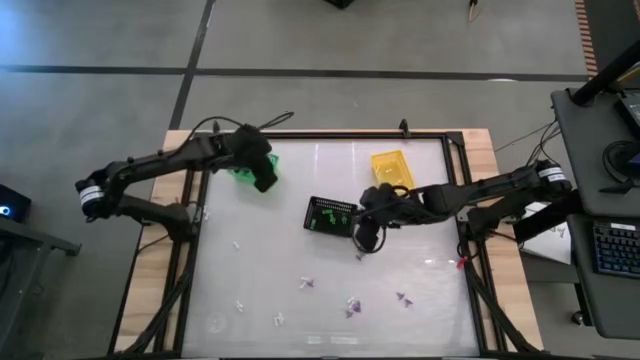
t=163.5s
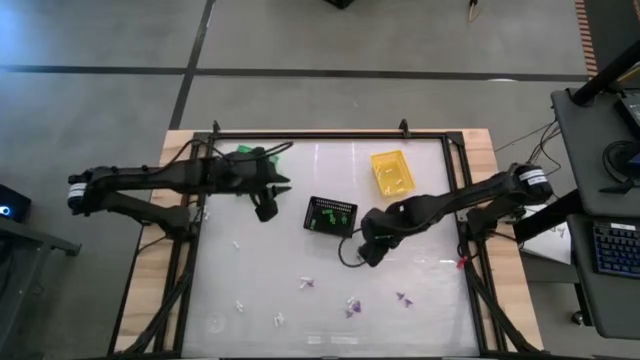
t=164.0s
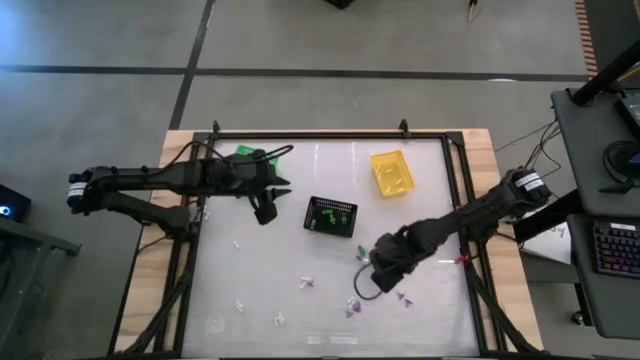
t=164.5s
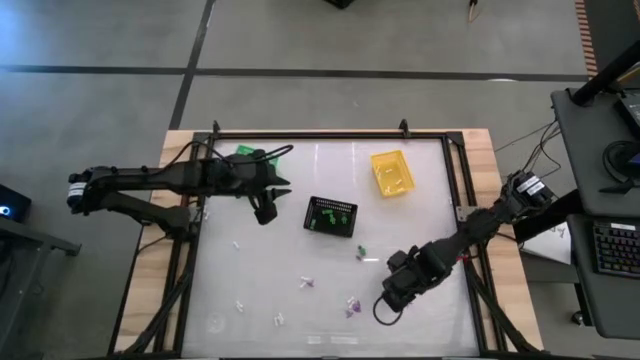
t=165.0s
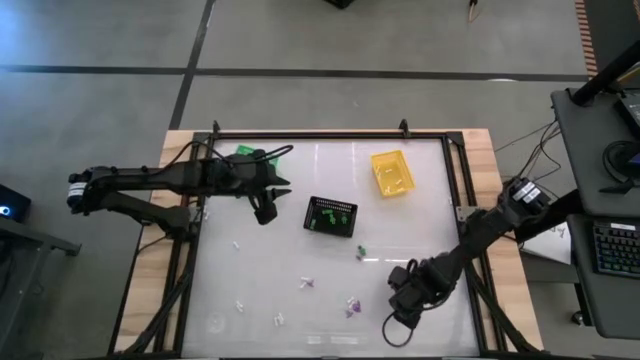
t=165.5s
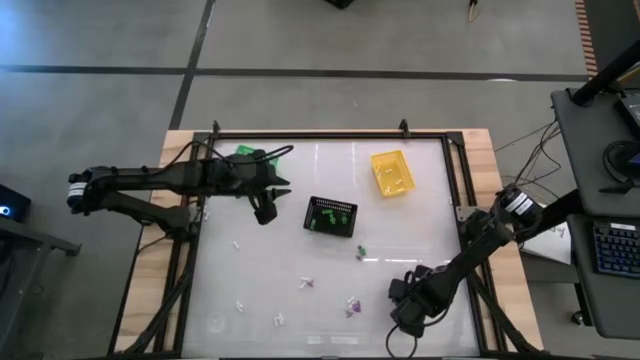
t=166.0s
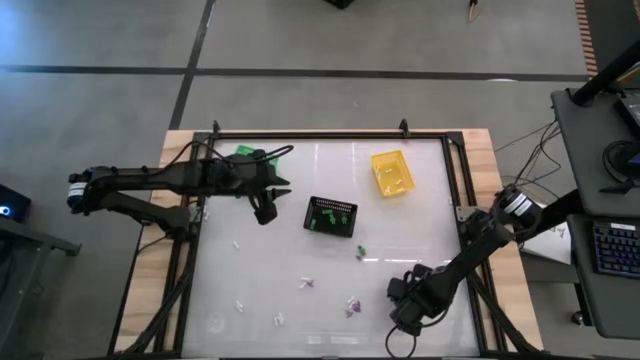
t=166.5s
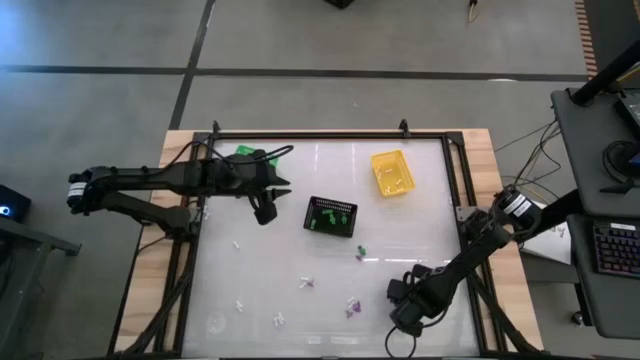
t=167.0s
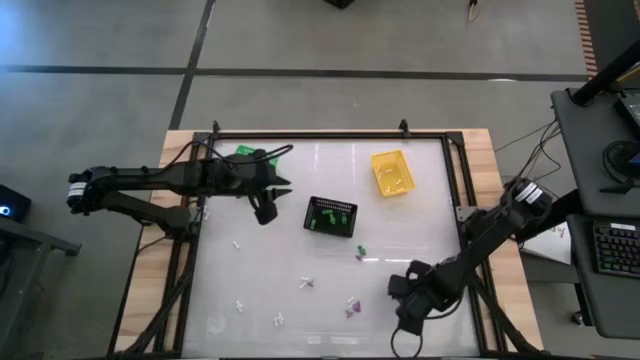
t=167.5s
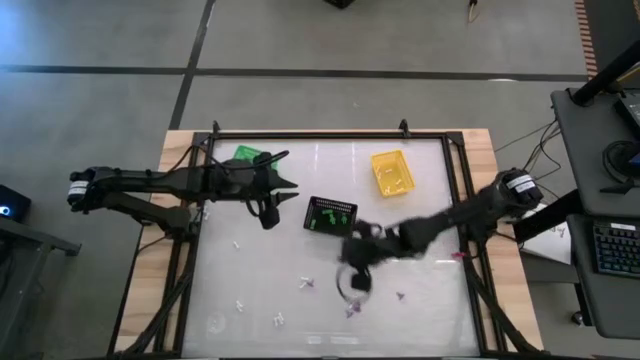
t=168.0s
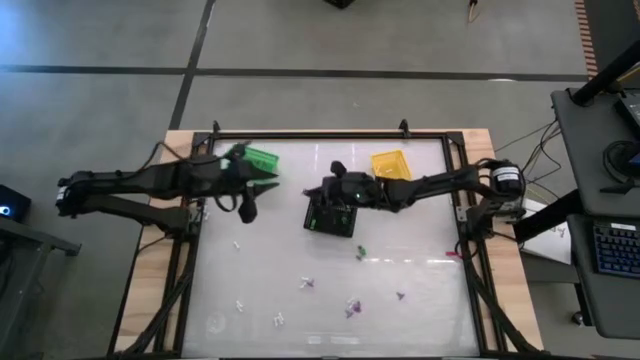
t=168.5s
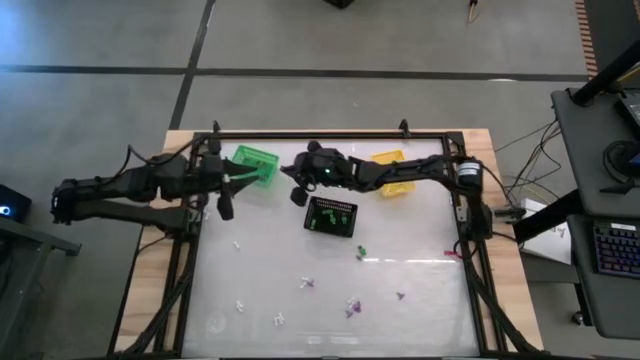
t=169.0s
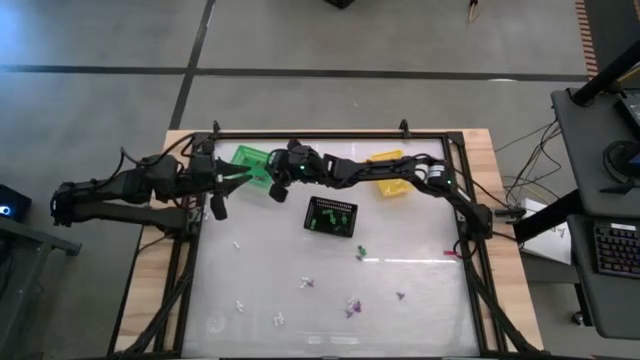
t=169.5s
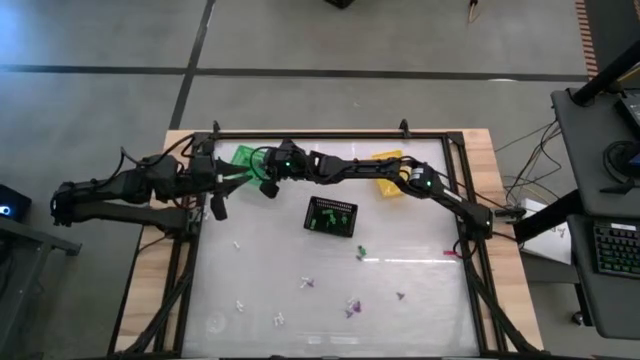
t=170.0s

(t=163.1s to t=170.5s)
Task: Sort Halloween decoration
Put the purple witch hat toy into the green bin

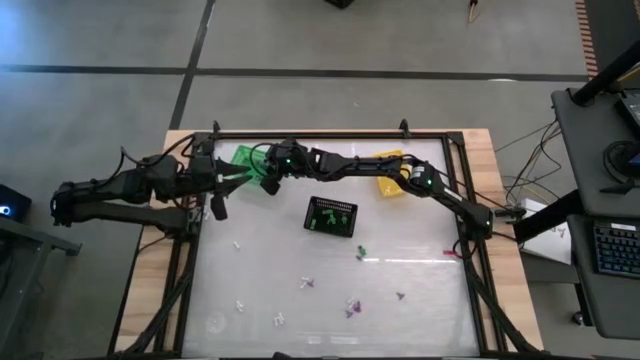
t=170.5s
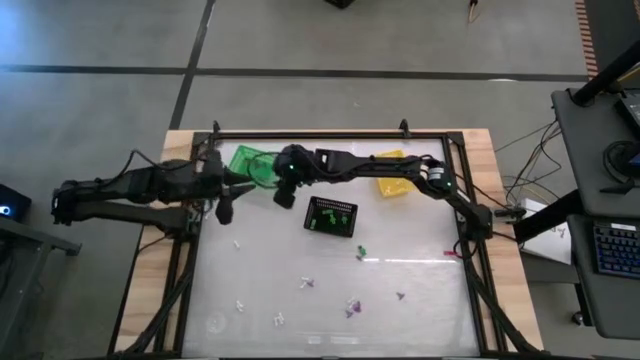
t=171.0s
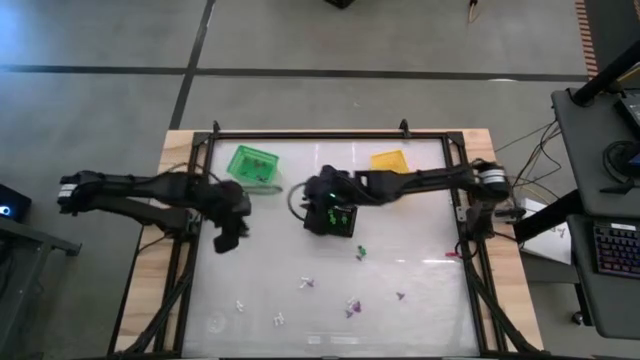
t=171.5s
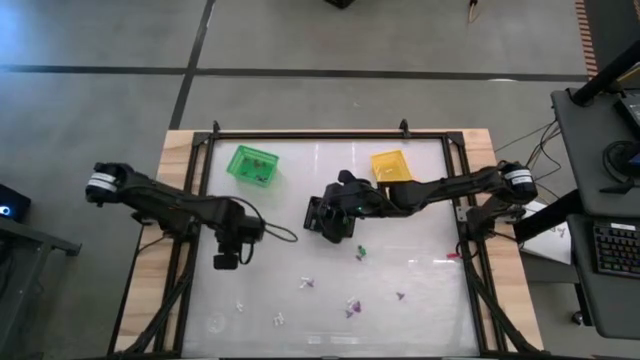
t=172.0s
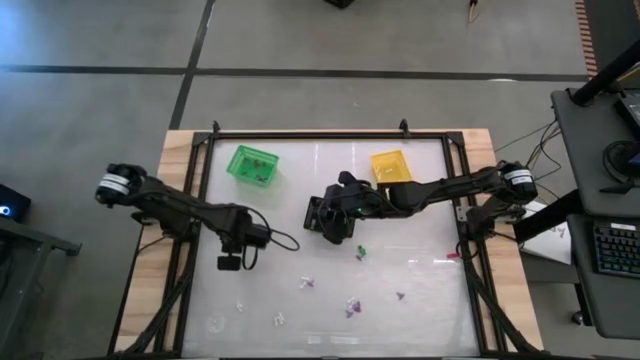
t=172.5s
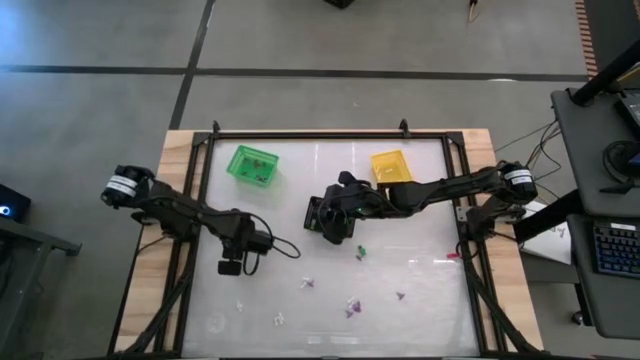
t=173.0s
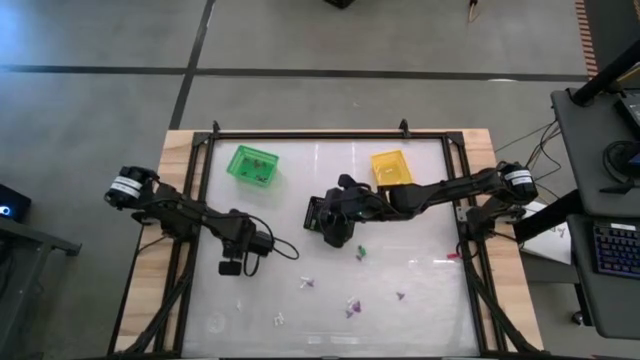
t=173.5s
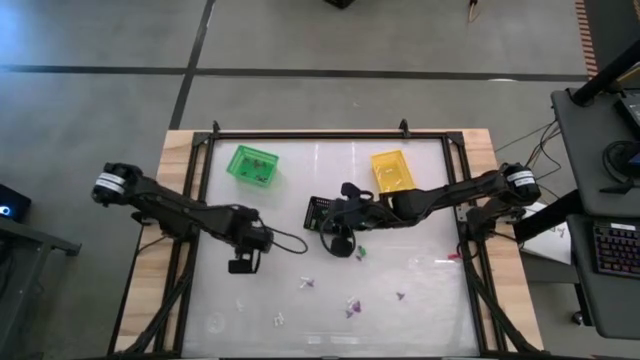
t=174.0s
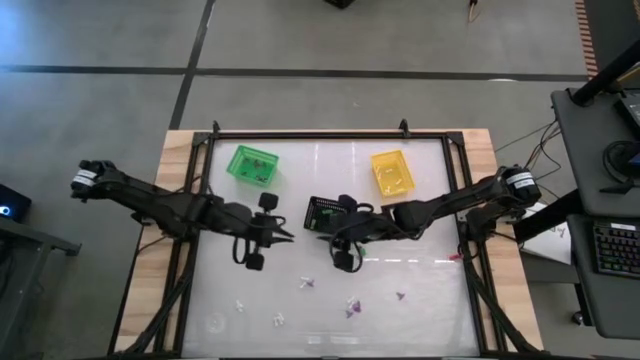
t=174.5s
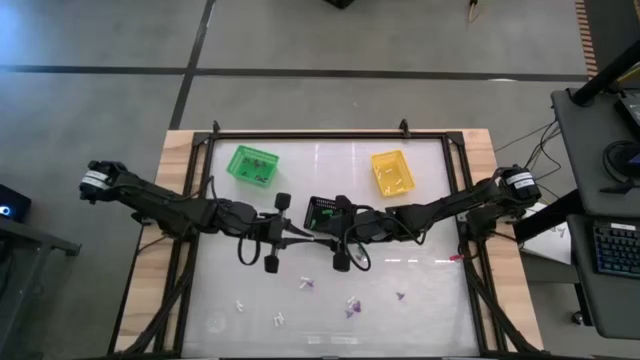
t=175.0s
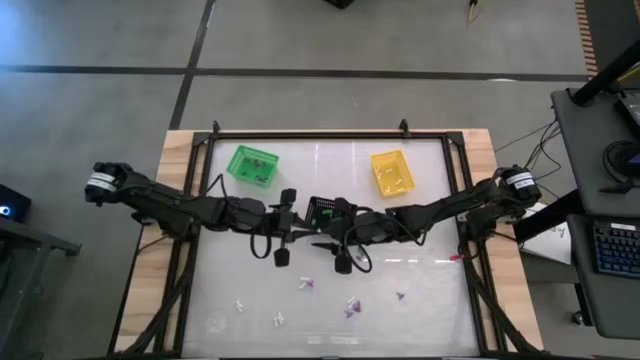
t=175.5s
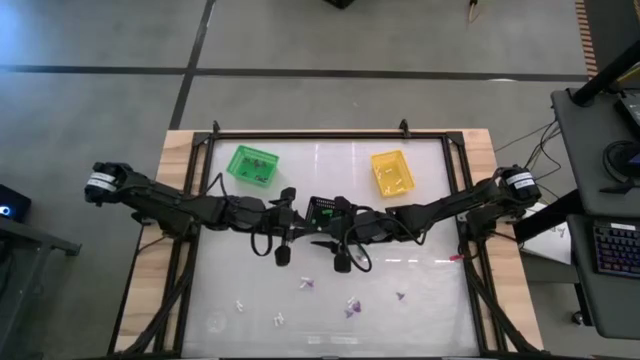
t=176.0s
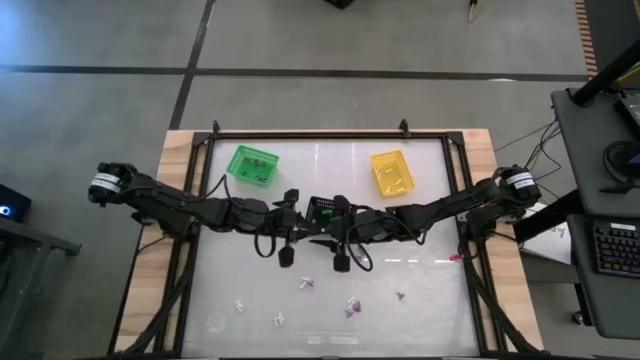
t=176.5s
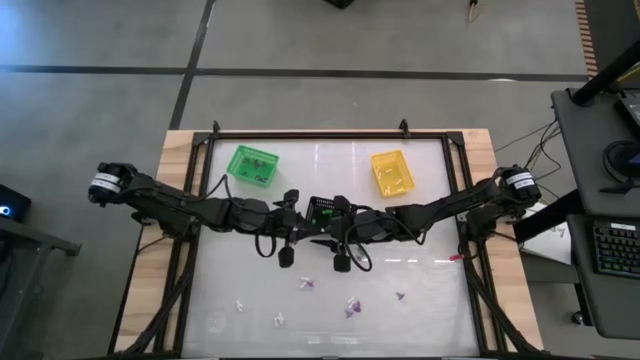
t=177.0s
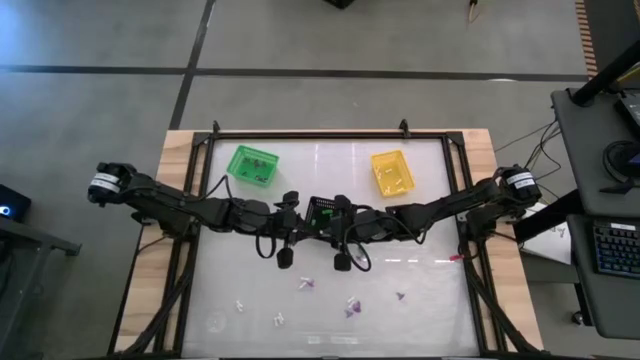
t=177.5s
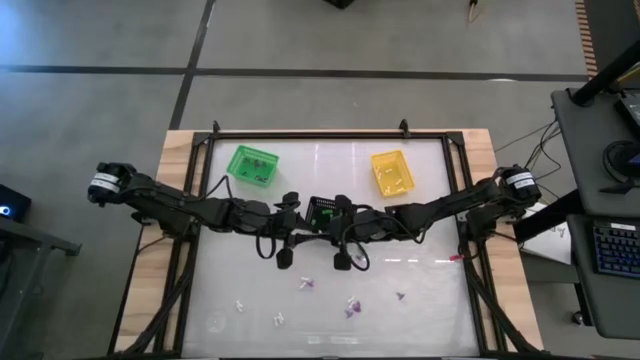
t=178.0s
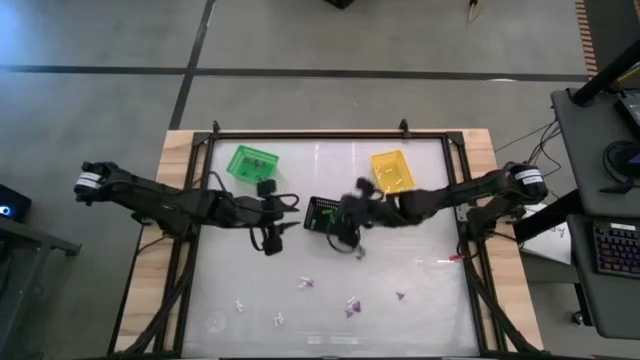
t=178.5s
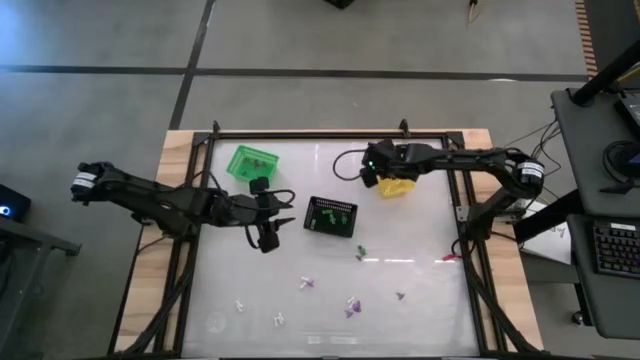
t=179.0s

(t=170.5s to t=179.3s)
Put the white bone toy into the yellow bin

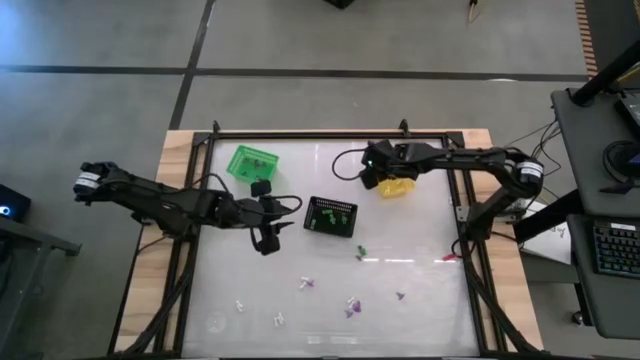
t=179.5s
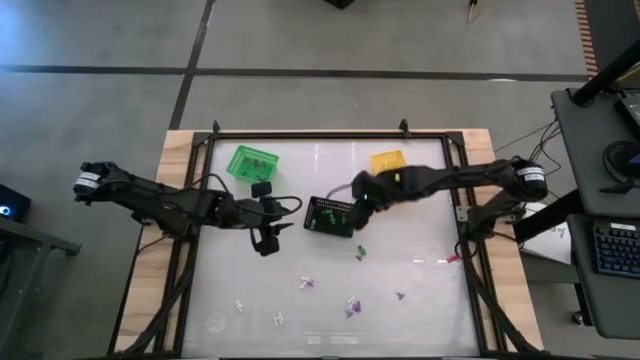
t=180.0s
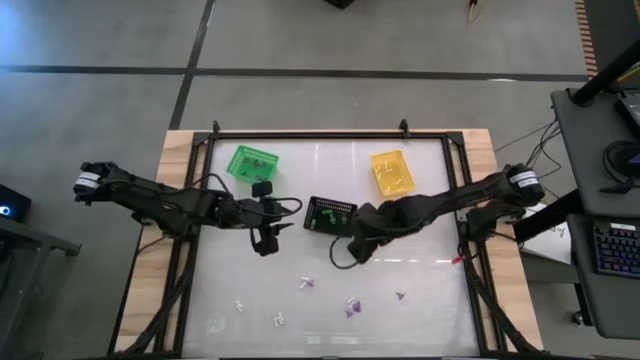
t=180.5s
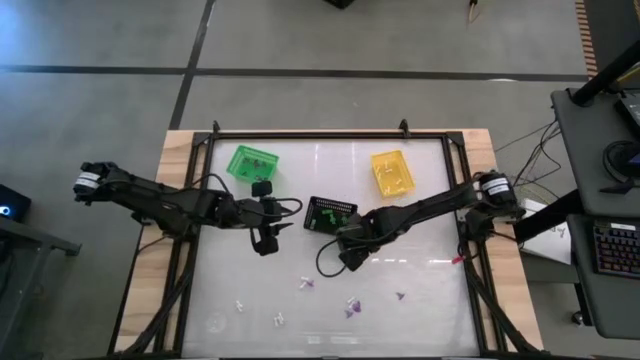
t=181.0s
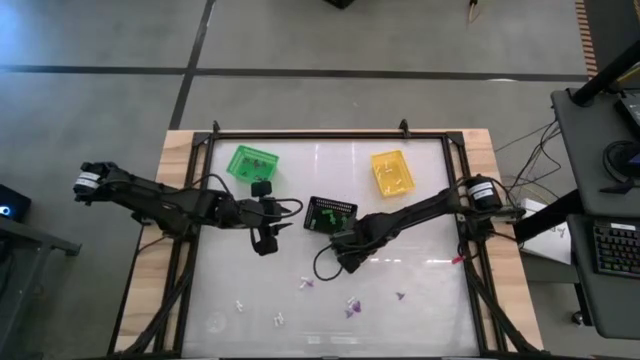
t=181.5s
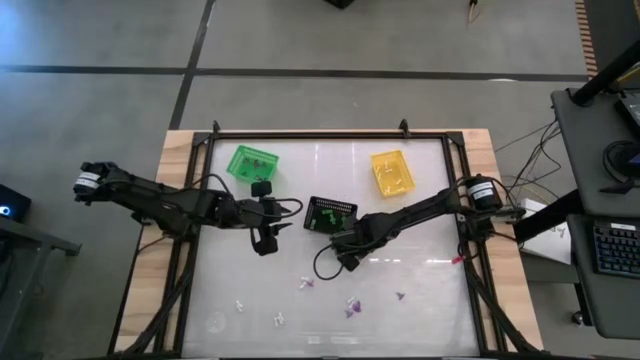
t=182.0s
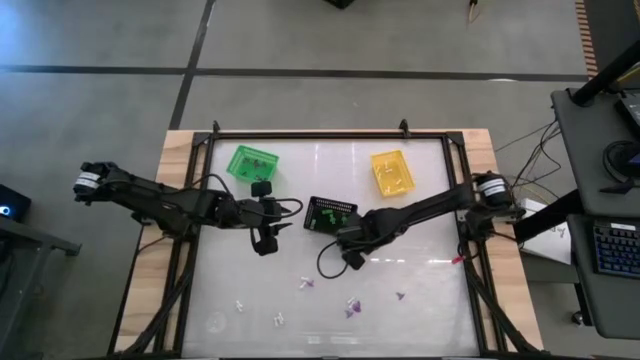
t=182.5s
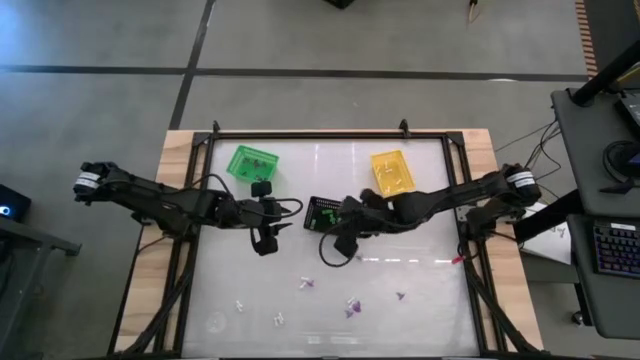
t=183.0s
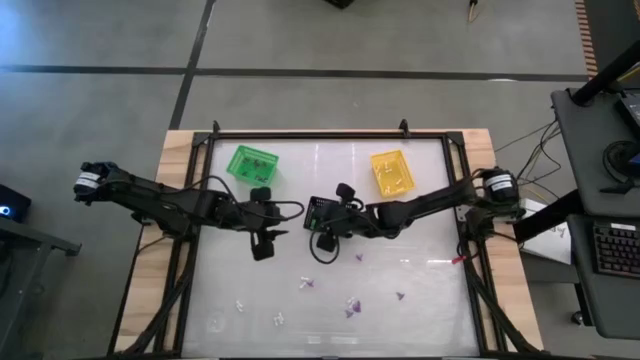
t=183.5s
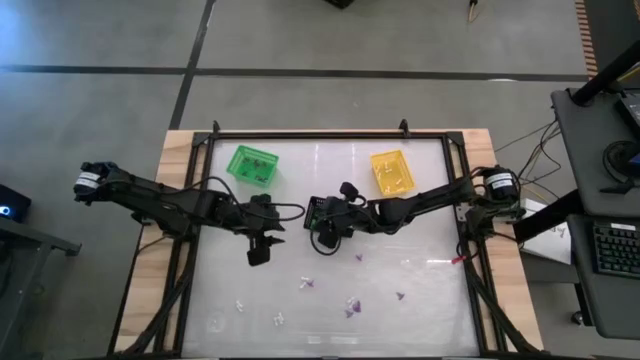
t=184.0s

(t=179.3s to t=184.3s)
Put the green skeleton toy into the black bin
